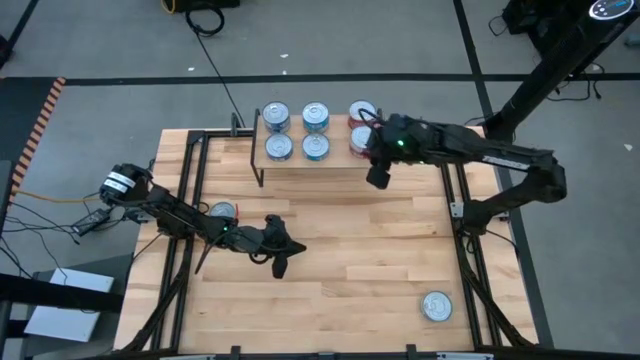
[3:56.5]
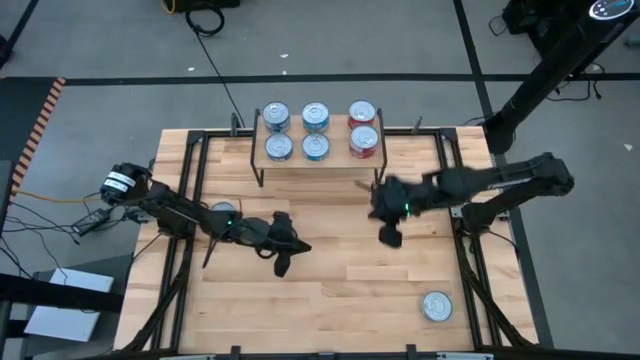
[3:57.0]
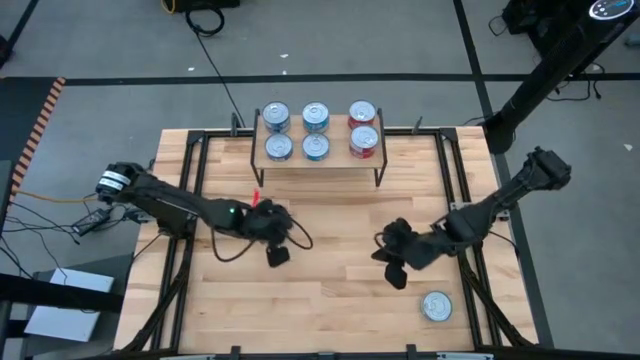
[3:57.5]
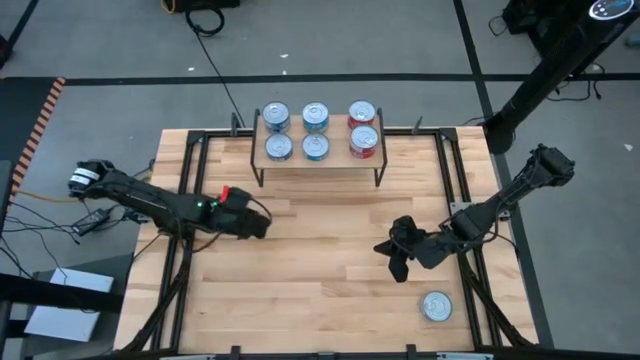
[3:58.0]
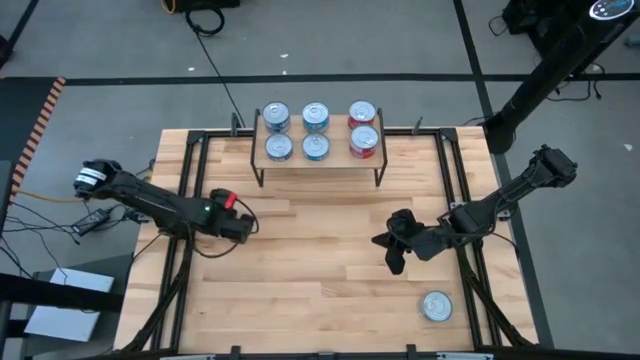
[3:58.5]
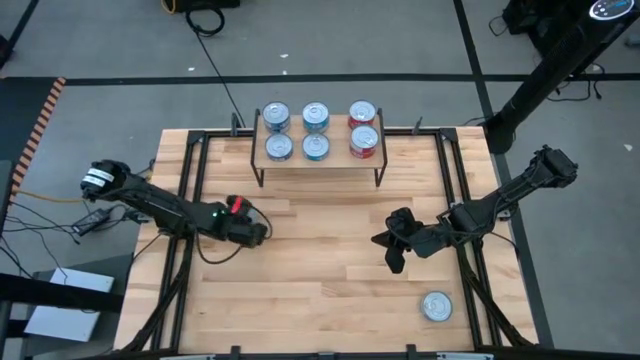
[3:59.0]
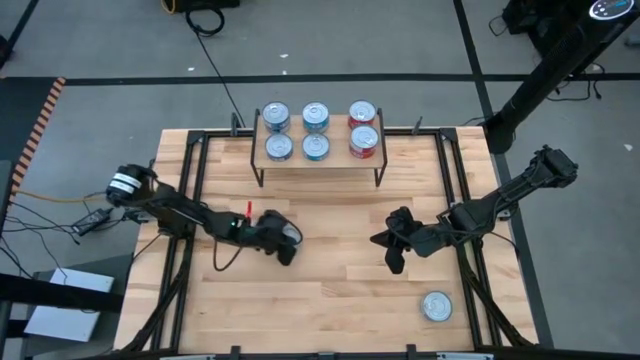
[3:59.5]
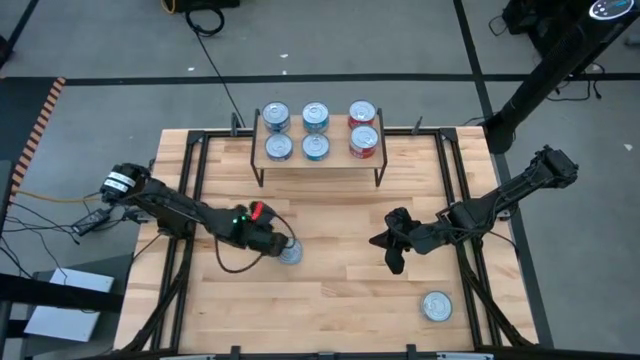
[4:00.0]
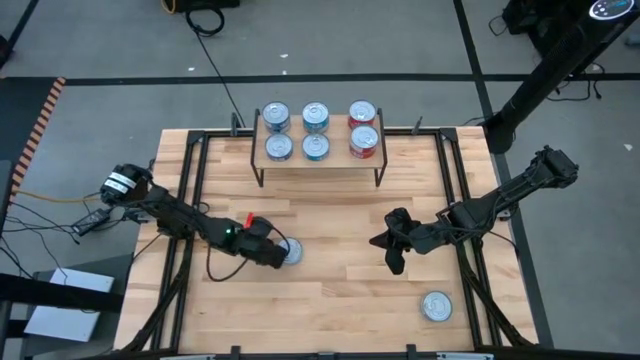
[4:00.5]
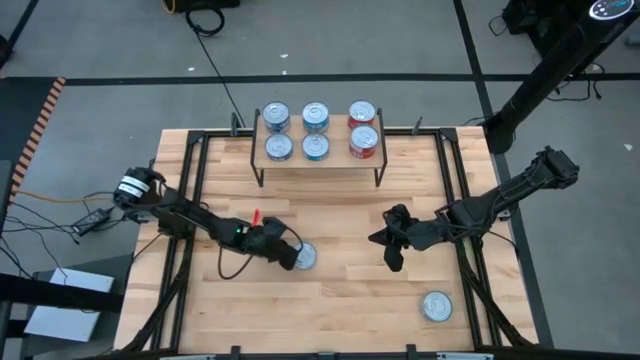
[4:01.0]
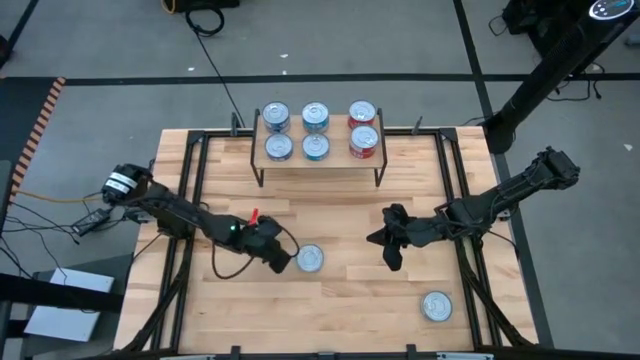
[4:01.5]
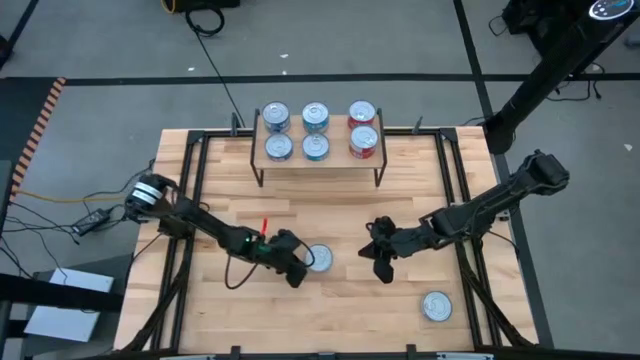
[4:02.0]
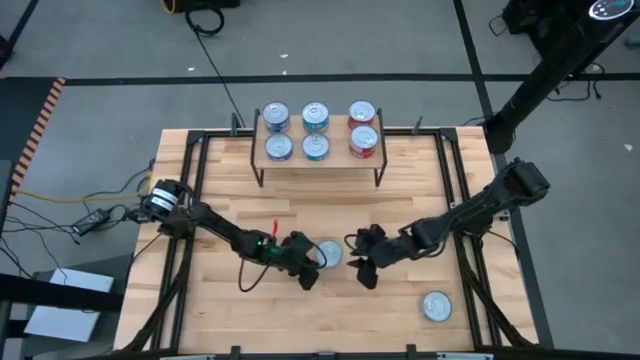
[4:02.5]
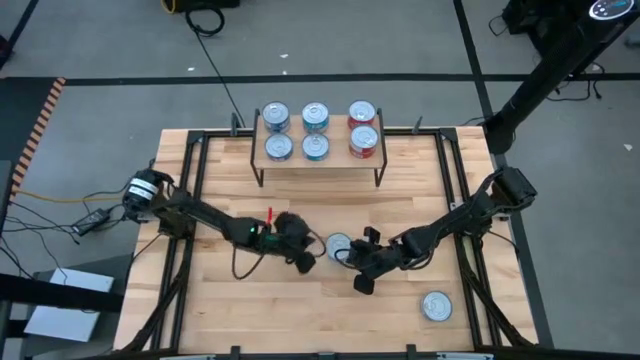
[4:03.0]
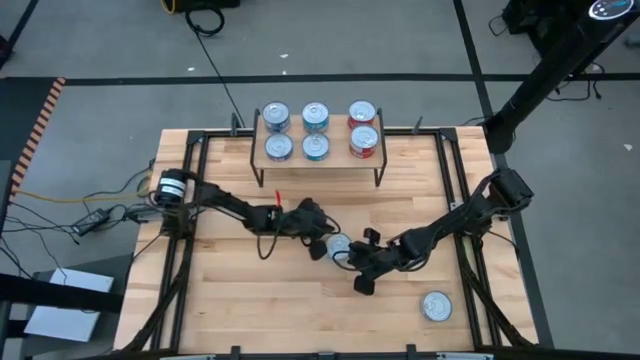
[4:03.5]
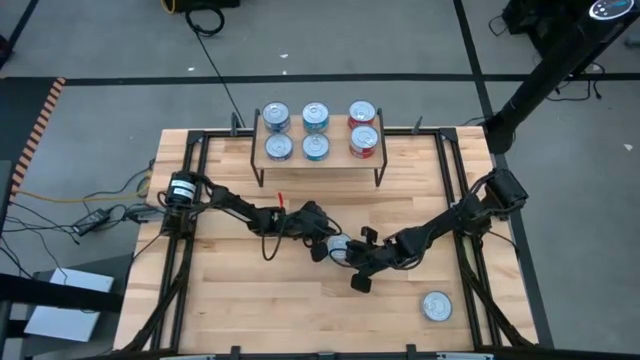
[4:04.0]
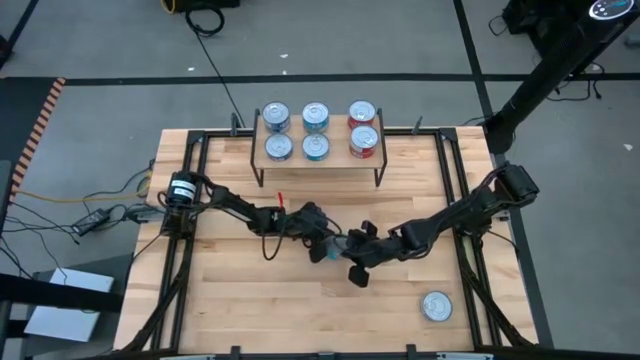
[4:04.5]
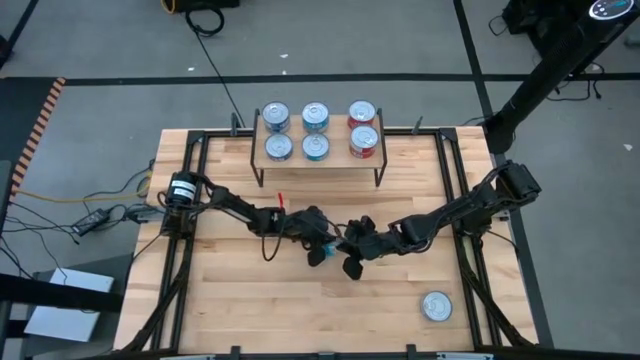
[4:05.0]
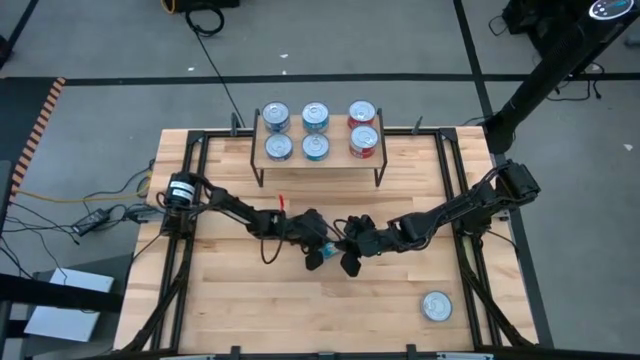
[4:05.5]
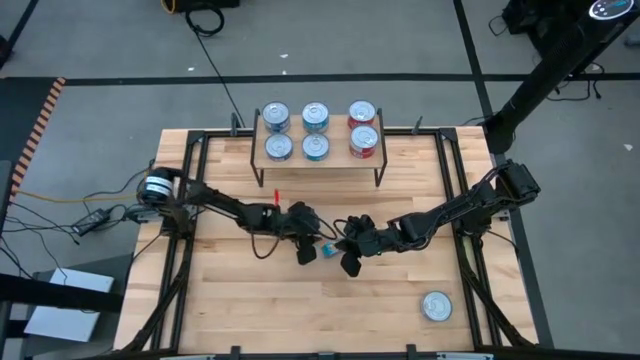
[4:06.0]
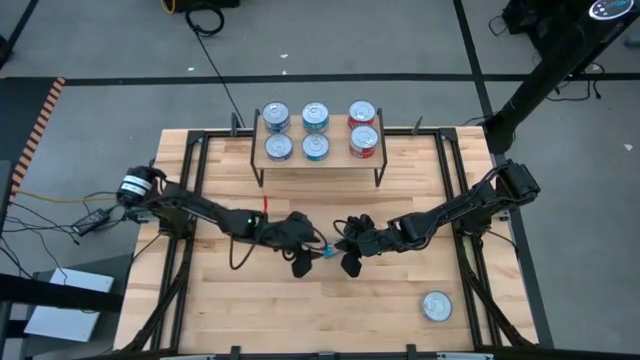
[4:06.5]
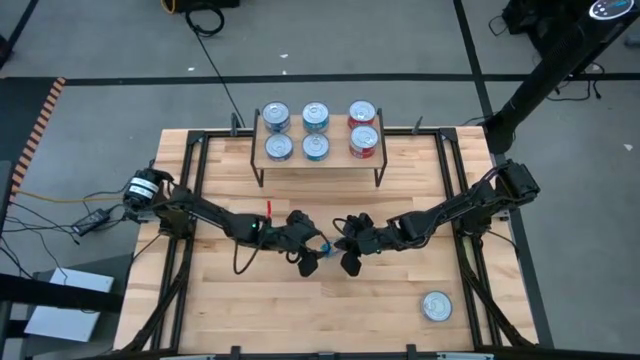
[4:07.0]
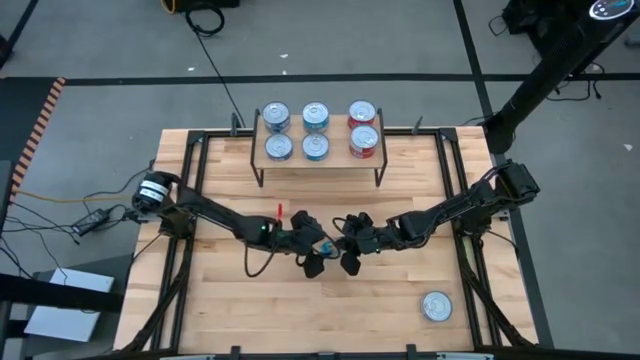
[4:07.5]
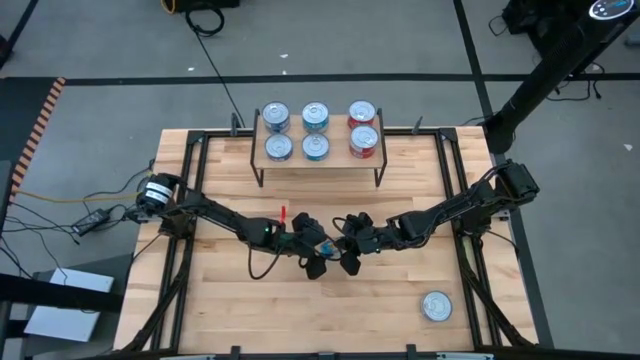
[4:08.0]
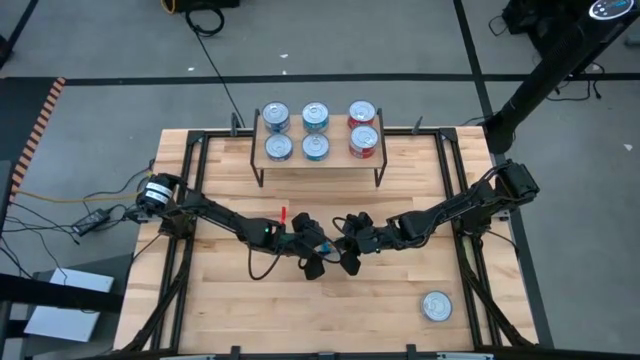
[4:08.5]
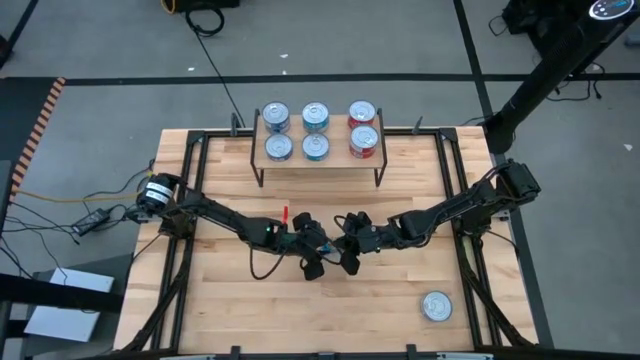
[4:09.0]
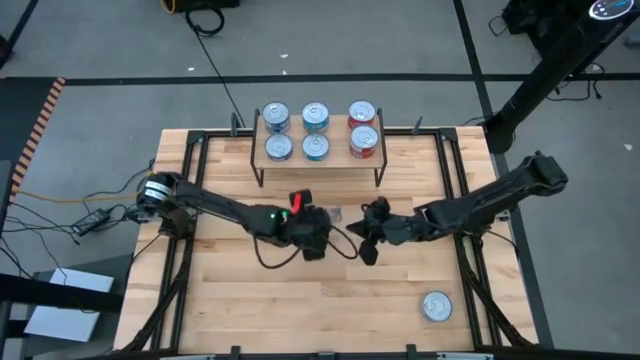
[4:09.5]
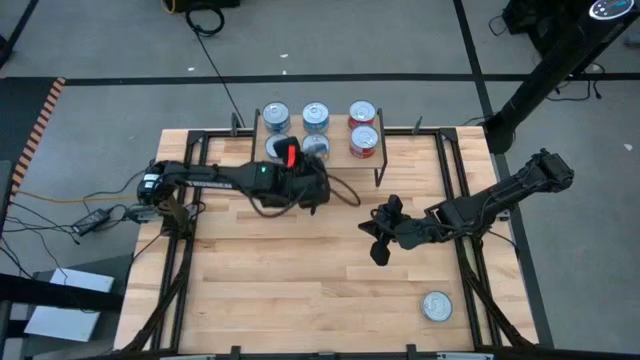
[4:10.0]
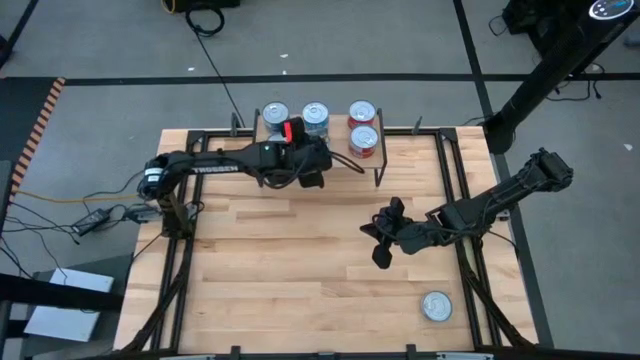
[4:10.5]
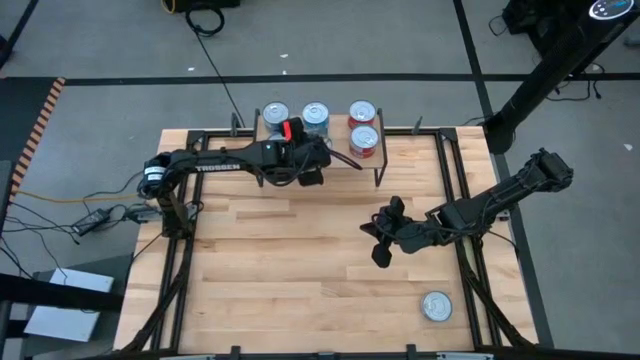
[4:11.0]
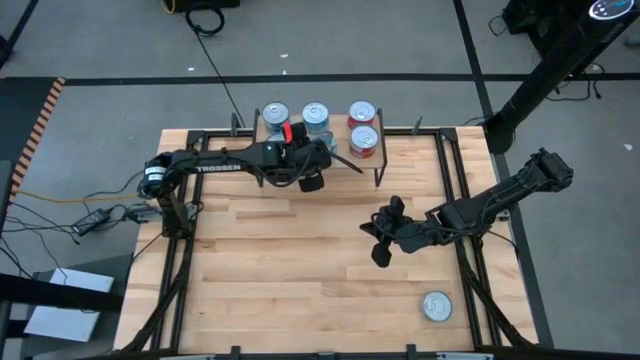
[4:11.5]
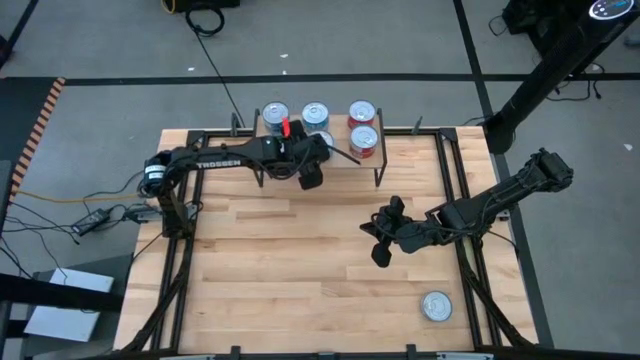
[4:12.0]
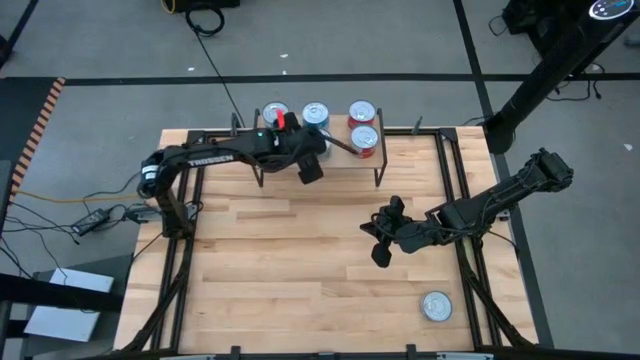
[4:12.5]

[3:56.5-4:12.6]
Task: Stack canned seafood by type on shelf
Stack the yellow-blue tuna can on top of the yellow-blue tuna can on the shelf

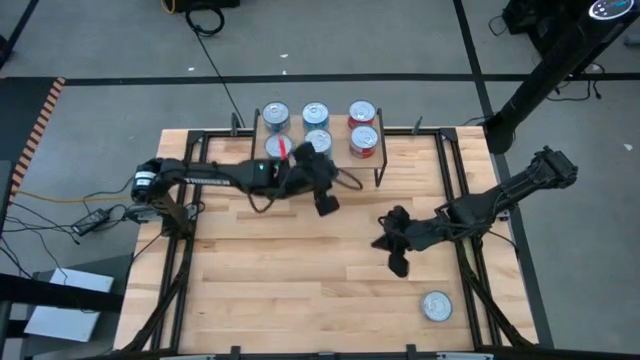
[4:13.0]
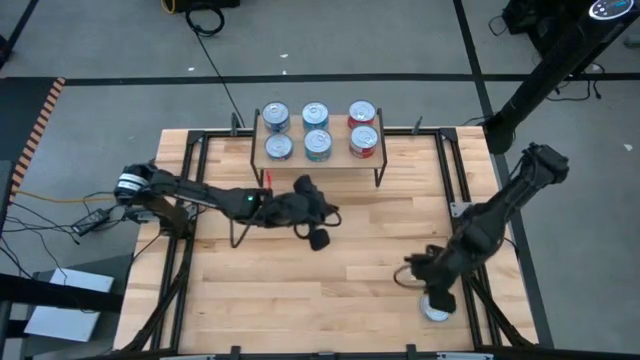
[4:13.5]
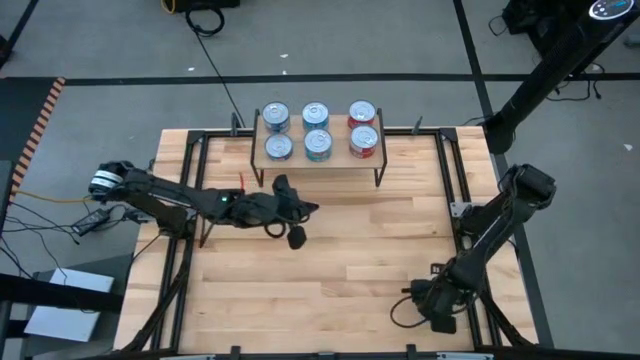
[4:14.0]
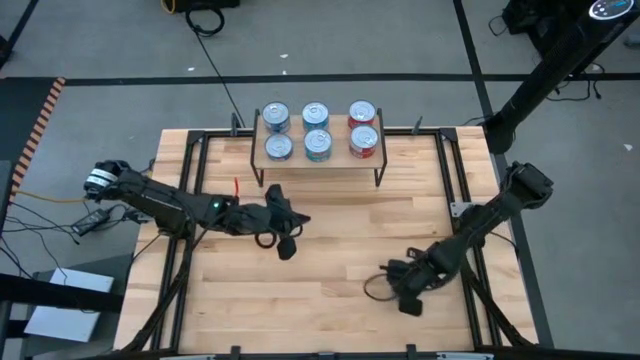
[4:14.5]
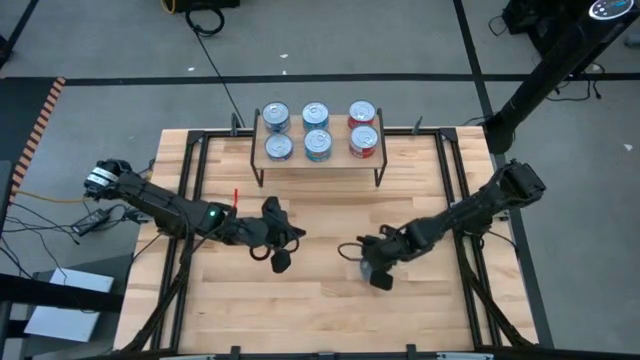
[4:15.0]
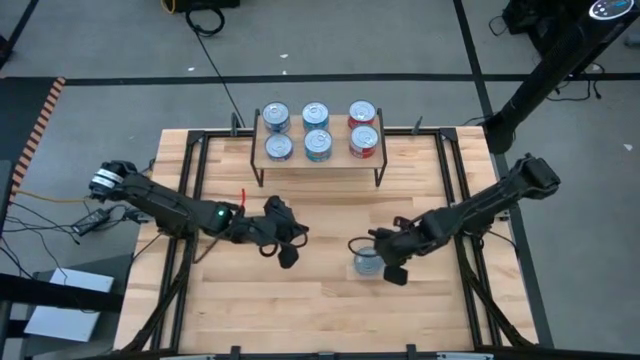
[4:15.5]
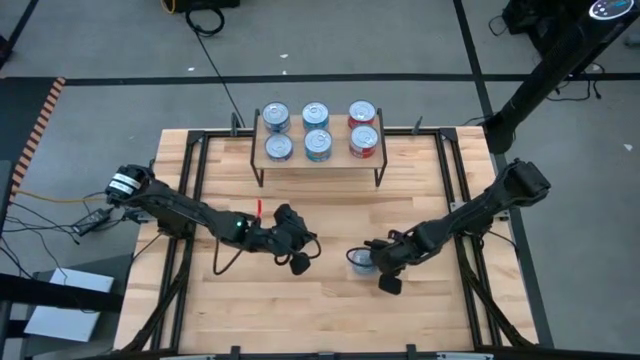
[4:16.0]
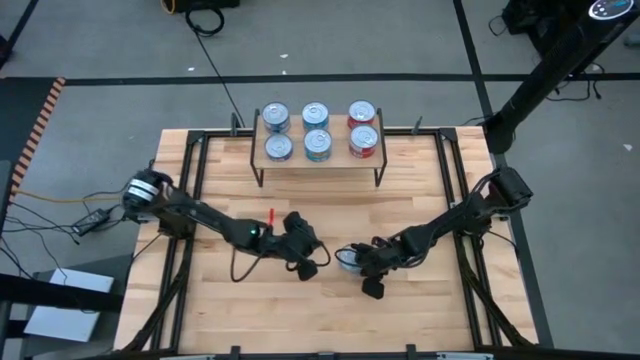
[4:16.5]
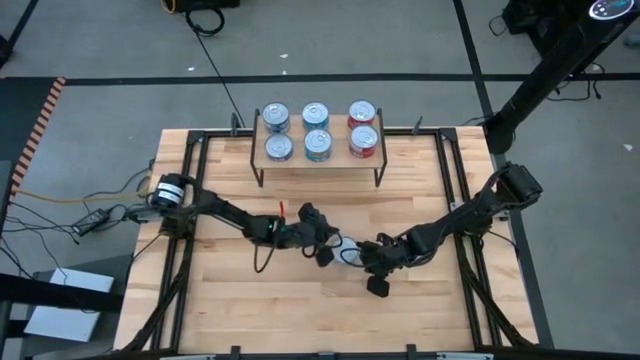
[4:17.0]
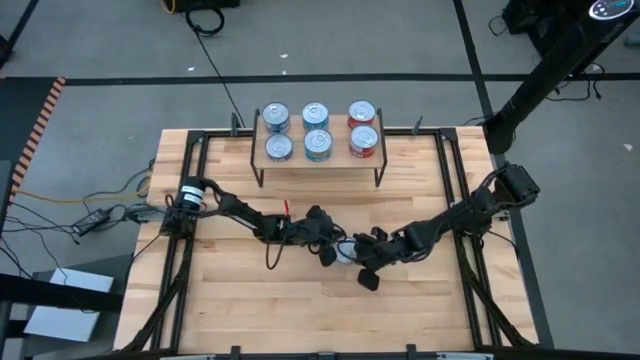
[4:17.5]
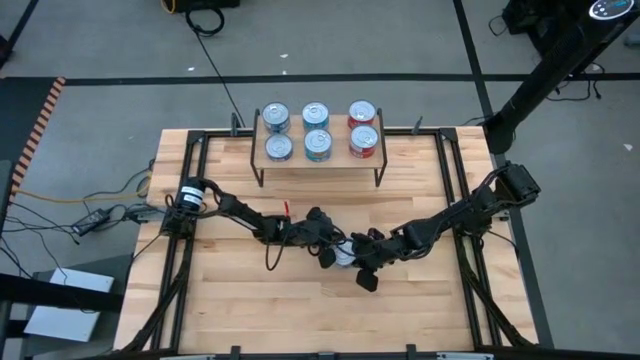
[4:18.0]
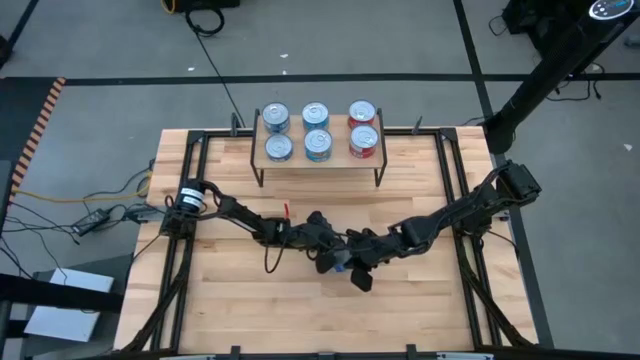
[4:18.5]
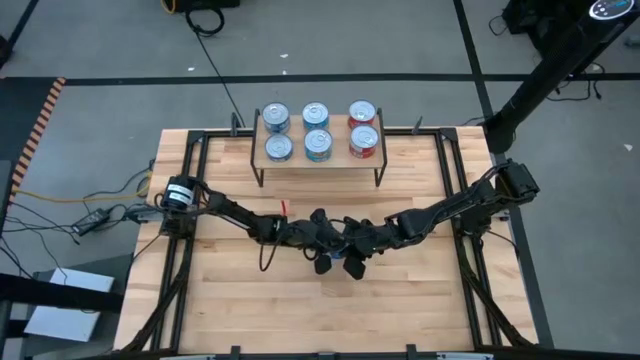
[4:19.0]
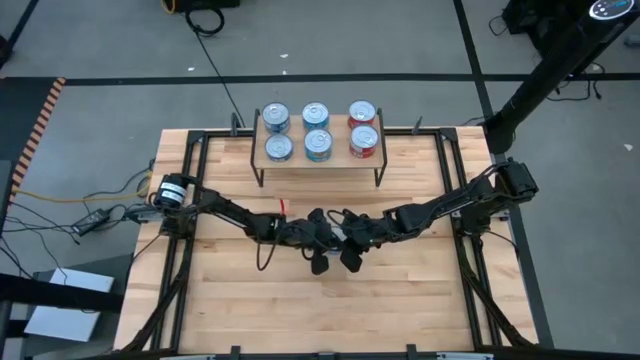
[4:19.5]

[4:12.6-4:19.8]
Stack the blue can on top of the other blue can on the shelf
